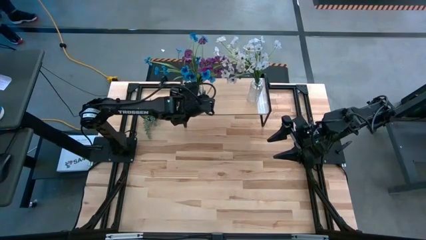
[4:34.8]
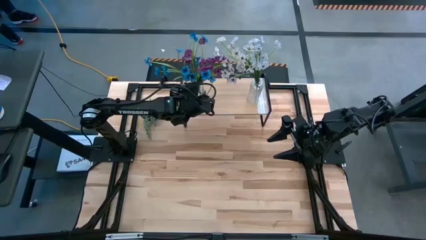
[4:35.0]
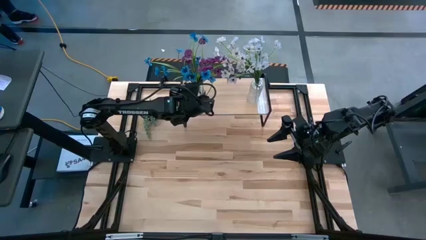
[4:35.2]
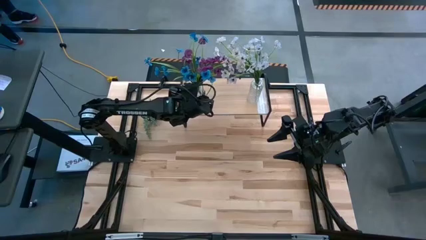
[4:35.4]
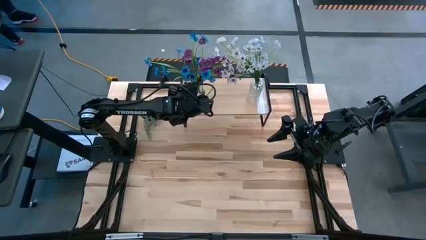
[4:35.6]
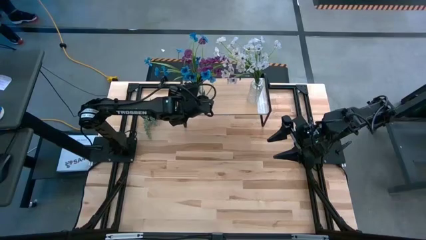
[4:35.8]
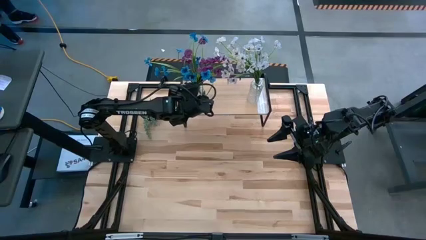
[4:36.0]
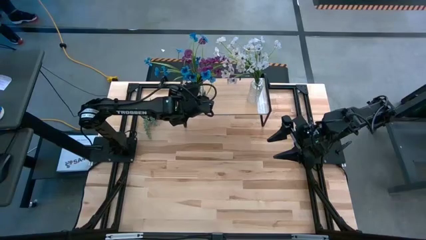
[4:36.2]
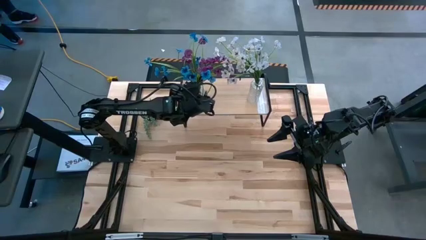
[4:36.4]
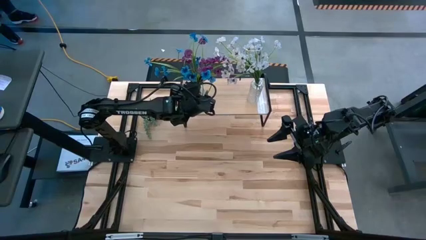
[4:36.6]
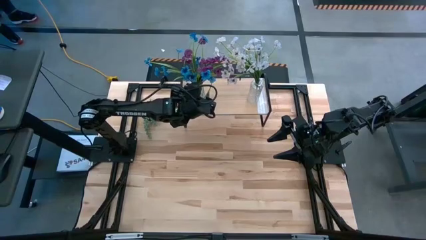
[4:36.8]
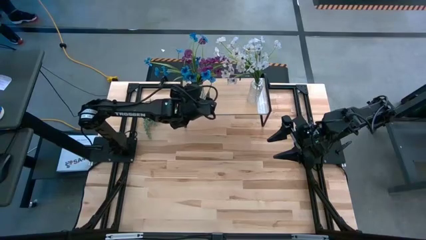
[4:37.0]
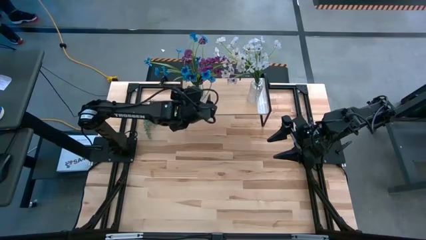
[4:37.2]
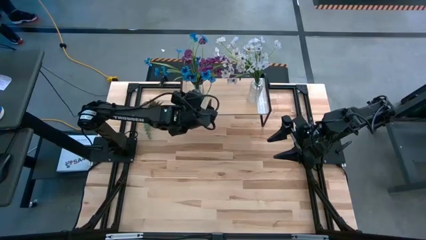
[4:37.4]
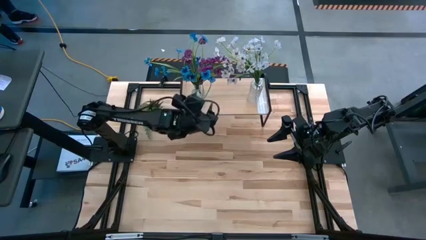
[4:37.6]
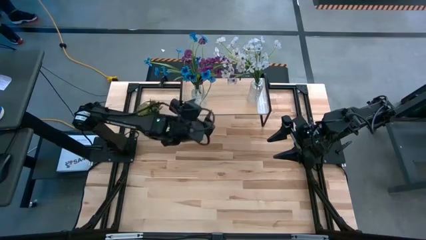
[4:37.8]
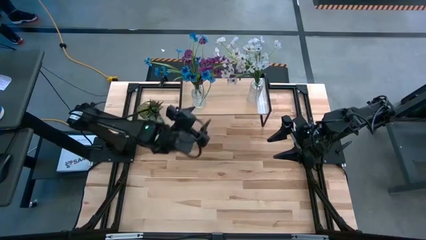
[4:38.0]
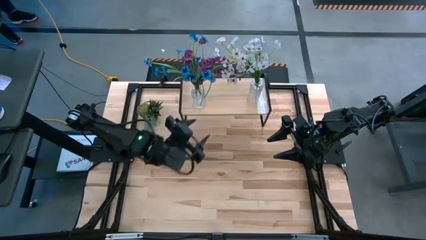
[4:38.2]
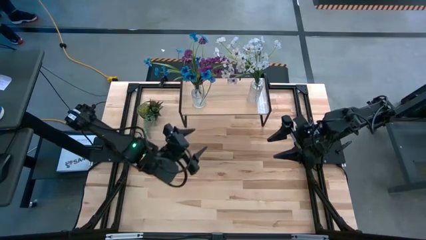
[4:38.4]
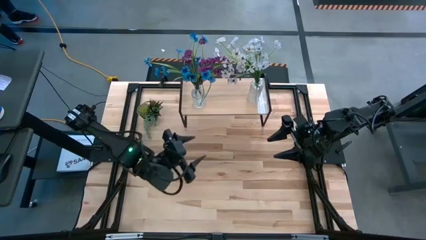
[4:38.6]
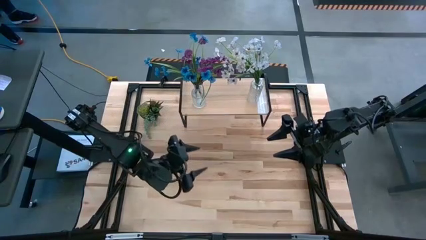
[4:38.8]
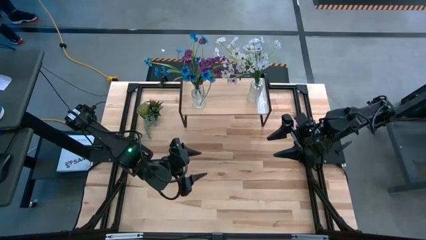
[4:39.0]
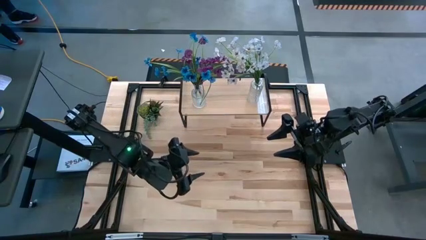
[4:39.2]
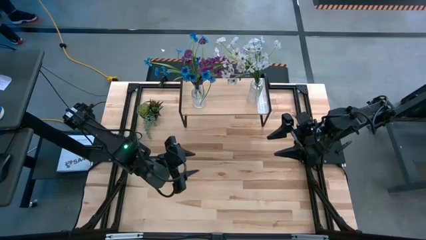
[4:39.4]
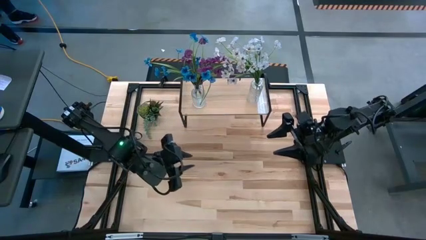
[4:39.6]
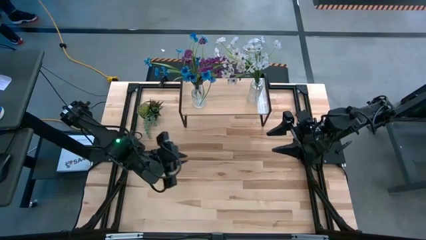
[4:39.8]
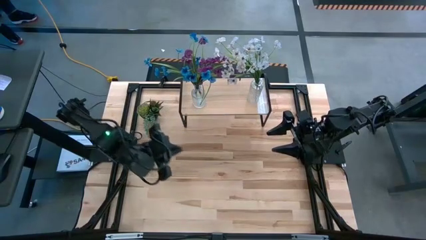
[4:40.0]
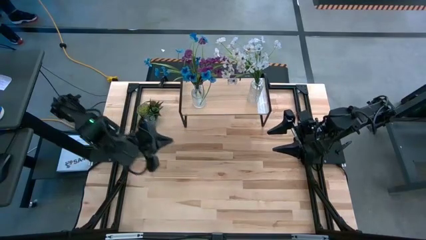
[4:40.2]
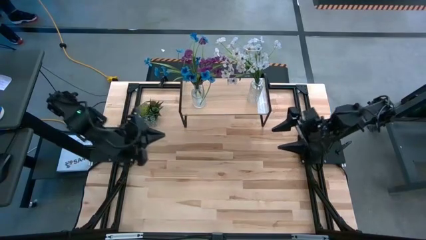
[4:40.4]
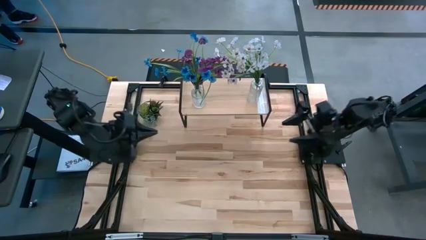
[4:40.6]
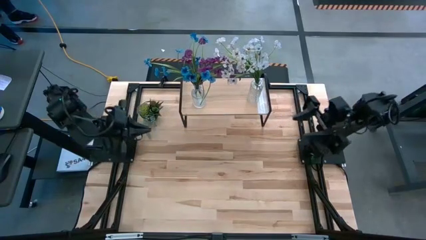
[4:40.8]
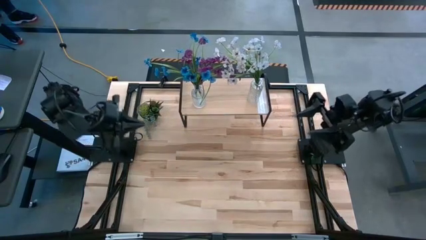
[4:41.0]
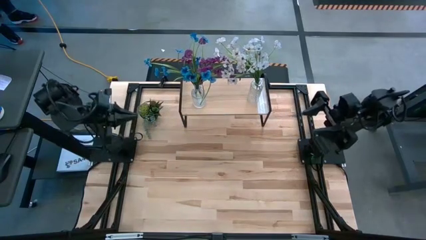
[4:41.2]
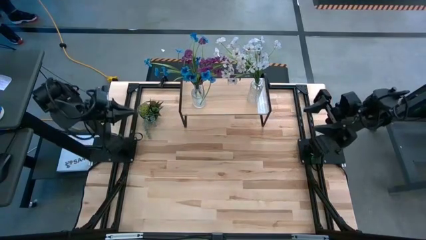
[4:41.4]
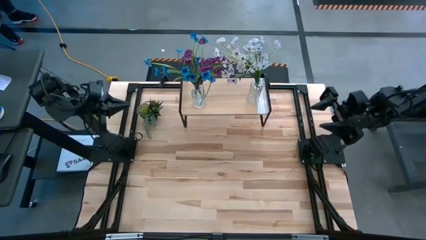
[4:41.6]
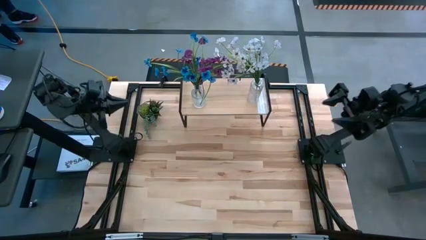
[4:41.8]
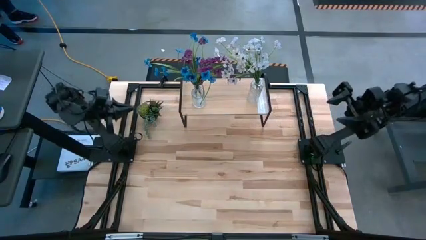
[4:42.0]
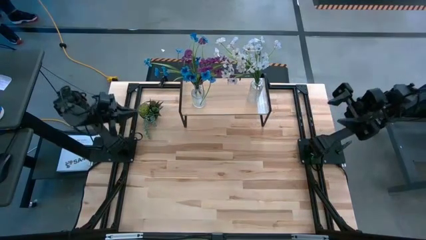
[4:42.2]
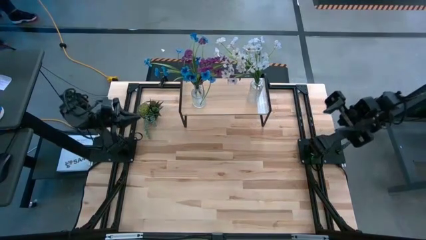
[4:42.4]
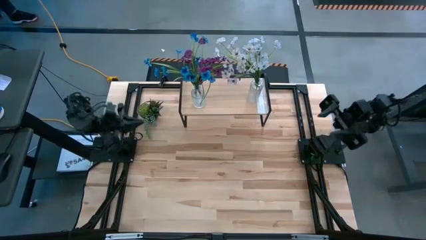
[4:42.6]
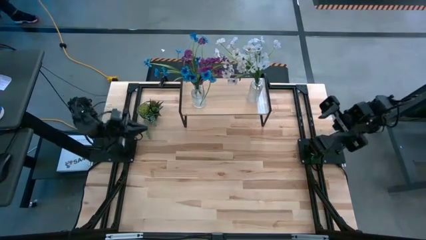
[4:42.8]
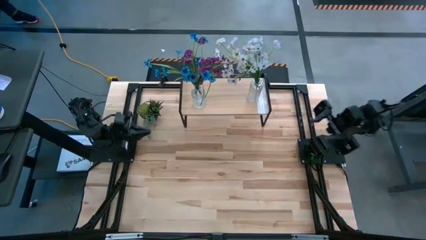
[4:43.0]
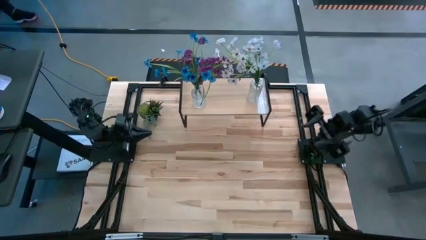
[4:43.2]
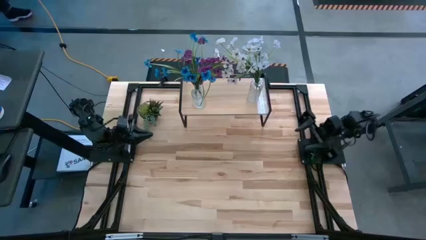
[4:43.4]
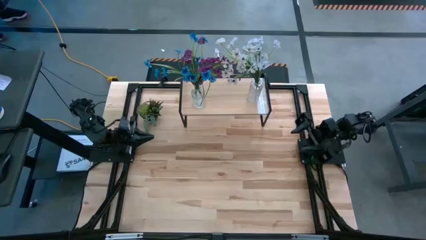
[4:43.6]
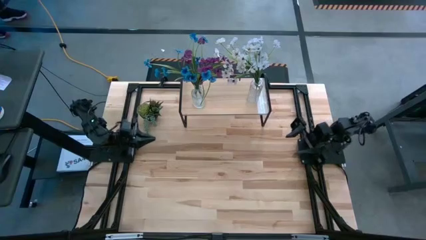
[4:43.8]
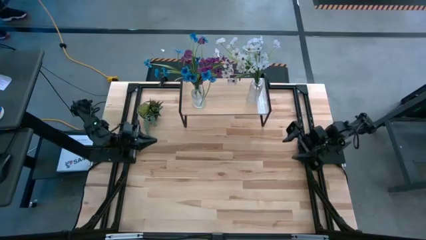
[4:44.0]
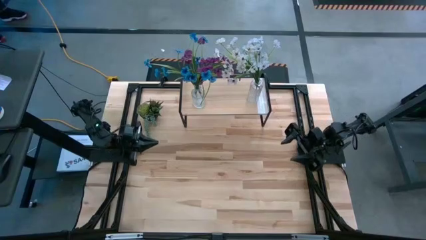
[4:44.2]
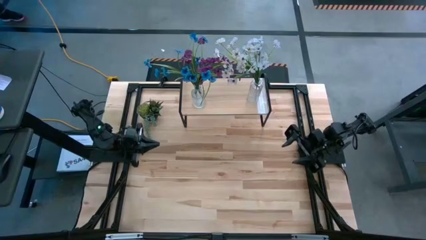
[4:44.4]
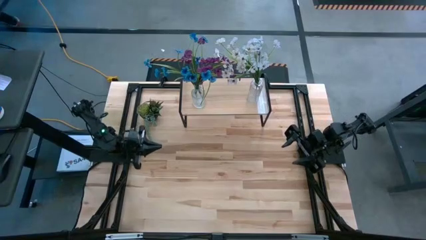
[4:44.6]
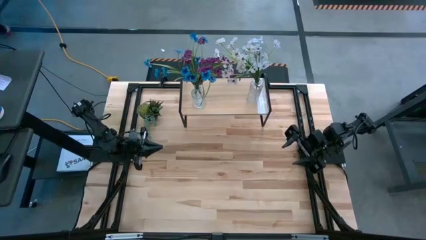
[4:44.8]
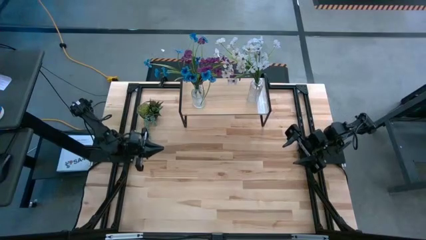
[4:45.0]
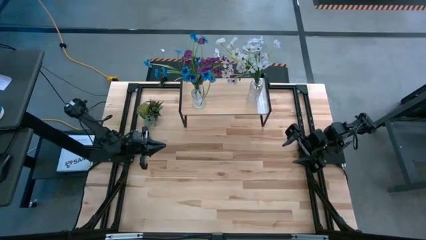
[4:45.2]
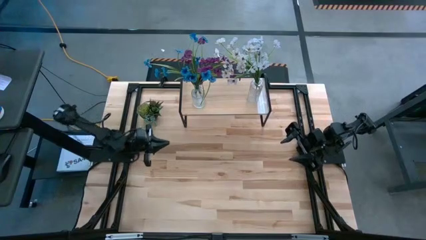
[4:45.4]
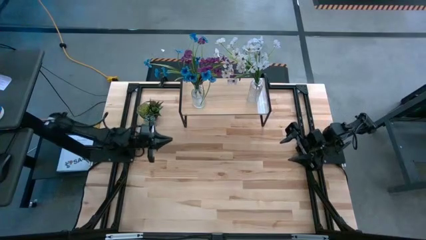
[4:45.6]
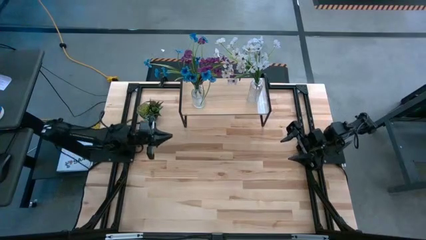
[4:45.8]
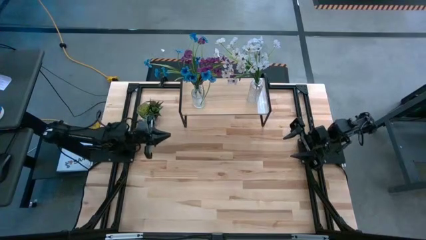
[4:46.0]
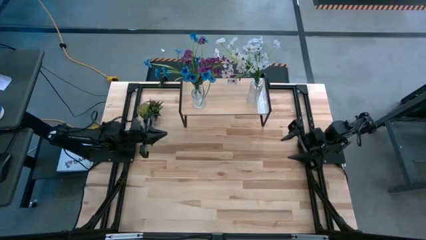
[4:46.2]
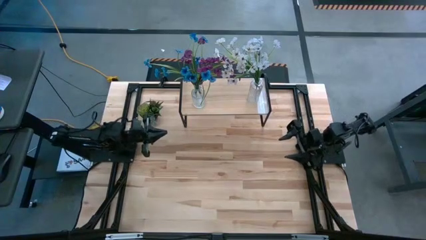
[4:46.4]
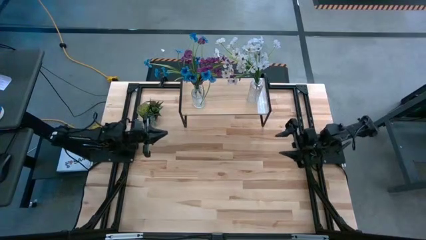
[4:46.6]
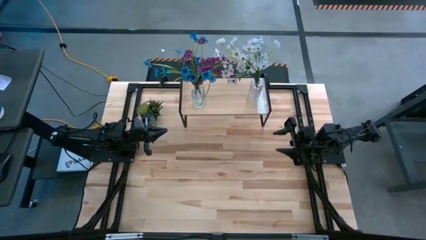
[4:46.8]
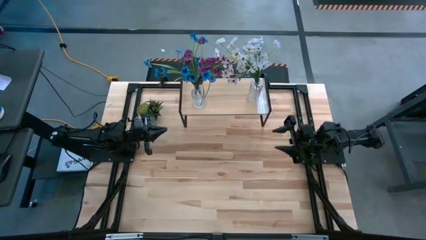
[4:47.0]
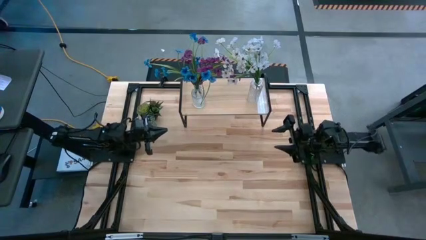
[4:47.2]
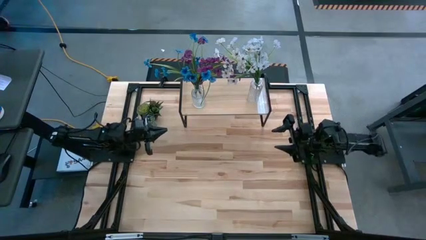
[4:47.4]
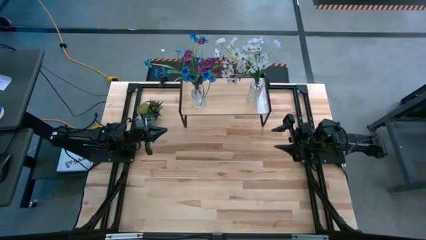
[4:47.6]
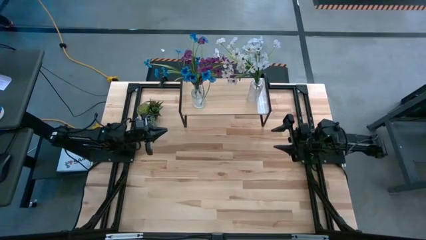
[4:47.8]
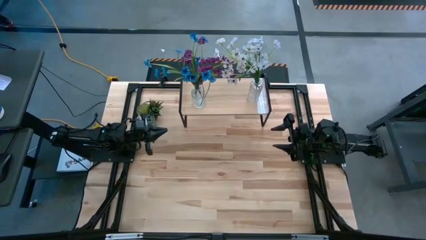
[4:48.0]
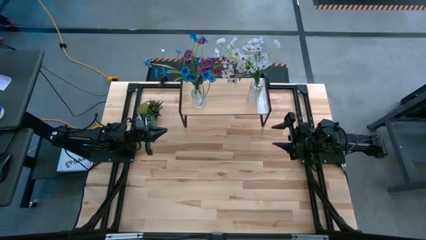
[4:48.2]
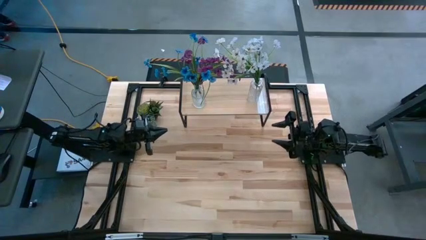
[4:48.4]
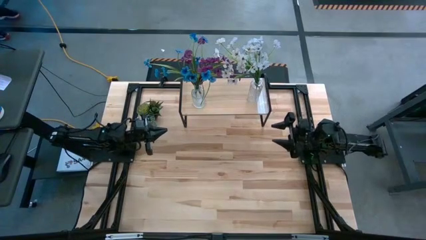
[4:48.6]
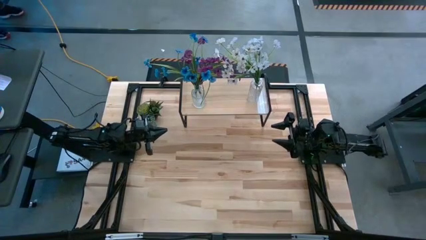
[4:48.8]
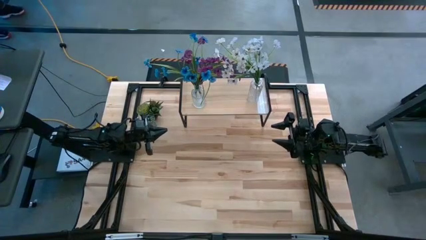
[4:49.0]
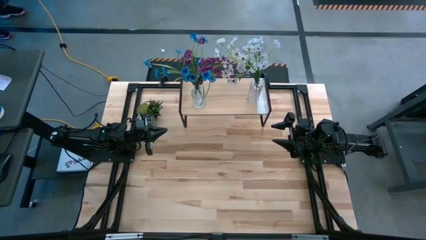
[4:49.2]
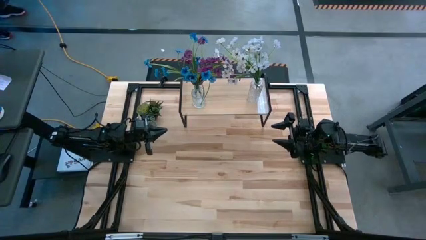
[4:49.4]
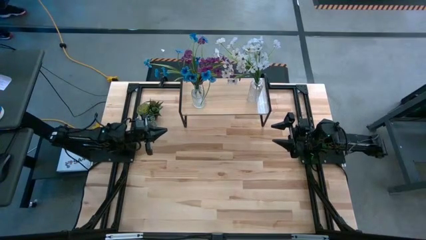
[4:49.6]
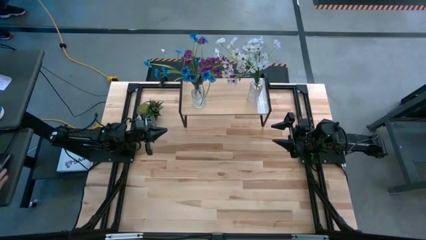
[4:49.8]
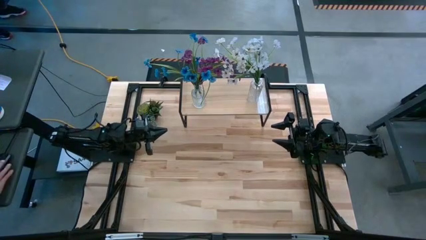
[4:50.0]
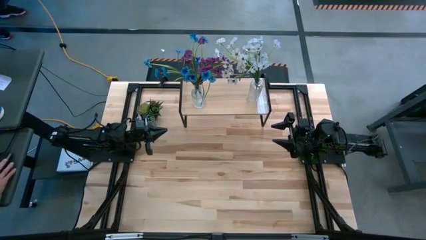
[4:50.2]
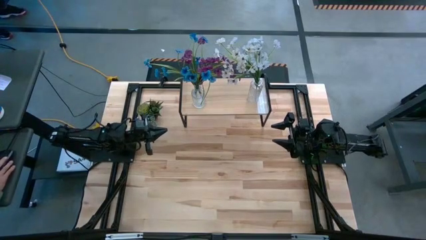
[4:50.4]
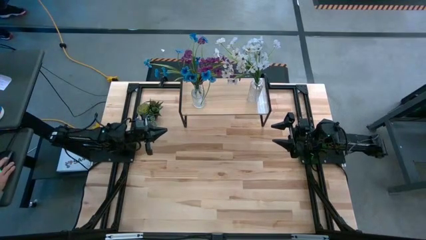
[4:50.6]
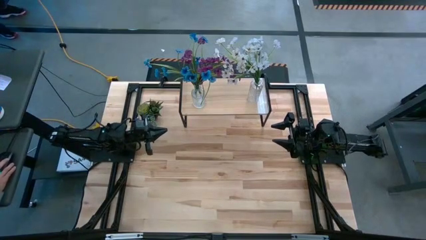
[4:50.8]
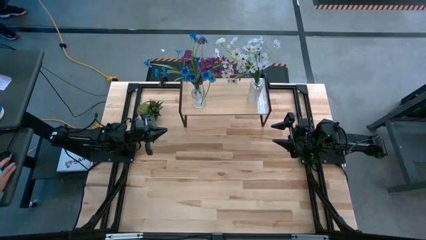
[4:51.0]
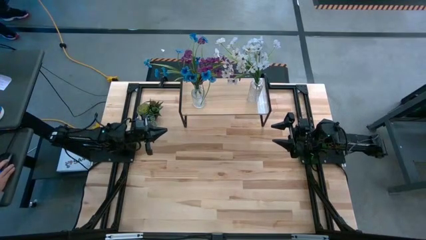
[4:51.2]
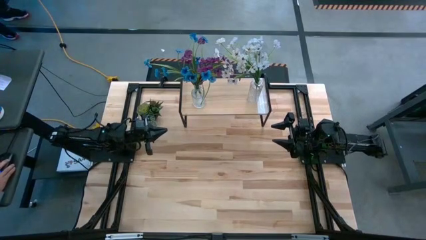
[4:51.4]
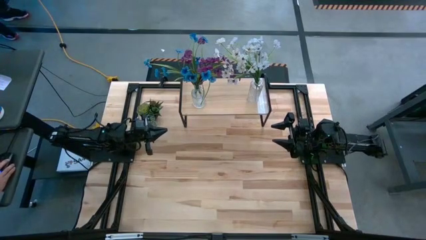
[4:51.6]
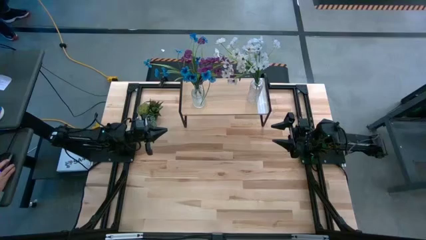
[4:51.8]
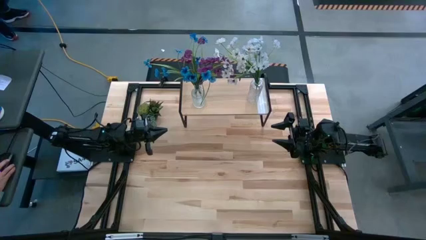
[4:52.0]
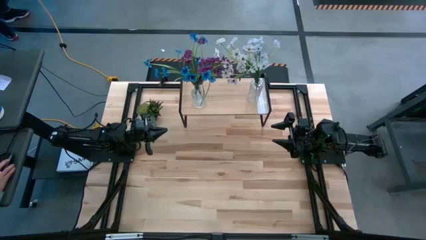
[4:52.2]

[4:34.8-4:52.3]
Task: Pick and place flowers into a vace then onto a shelf
Return to Home Position
